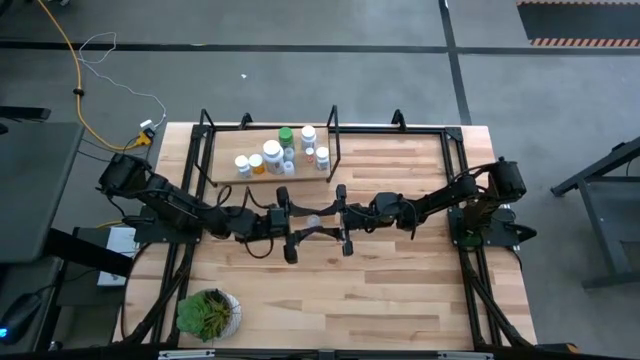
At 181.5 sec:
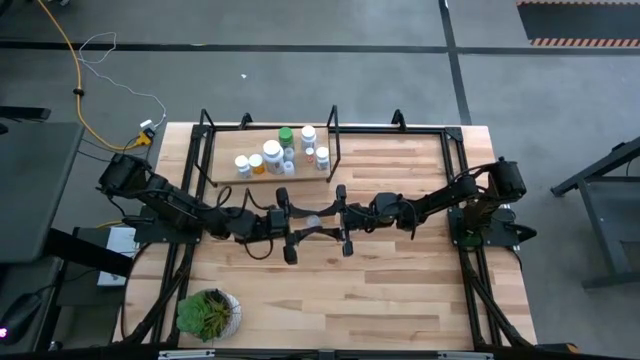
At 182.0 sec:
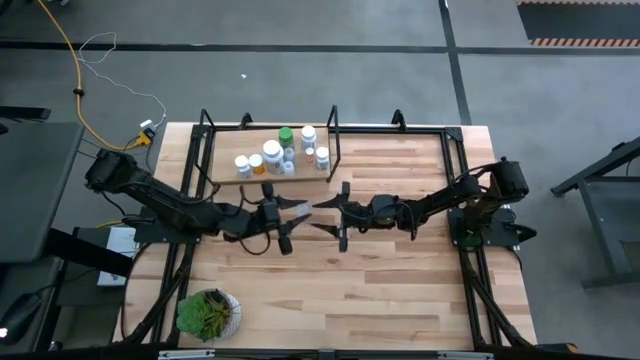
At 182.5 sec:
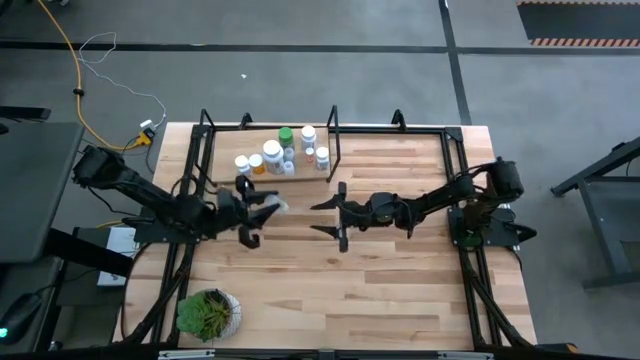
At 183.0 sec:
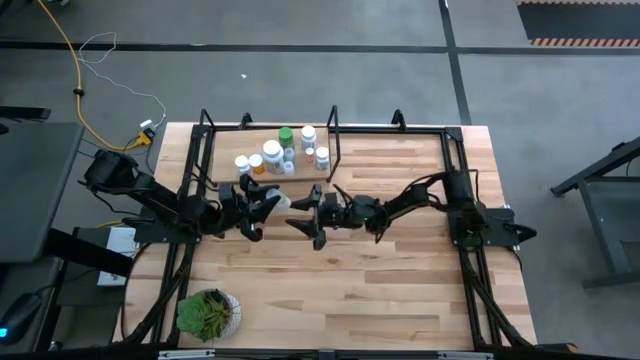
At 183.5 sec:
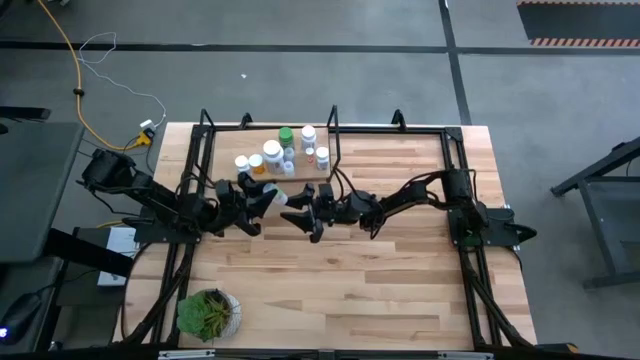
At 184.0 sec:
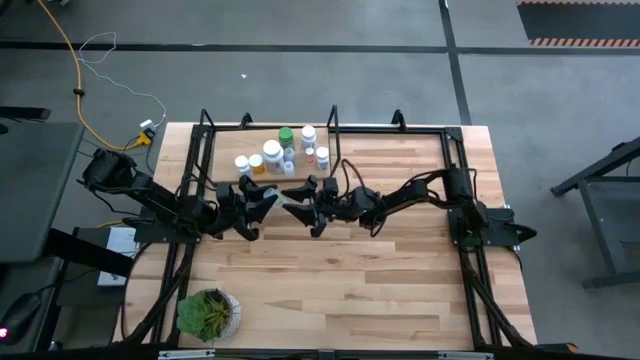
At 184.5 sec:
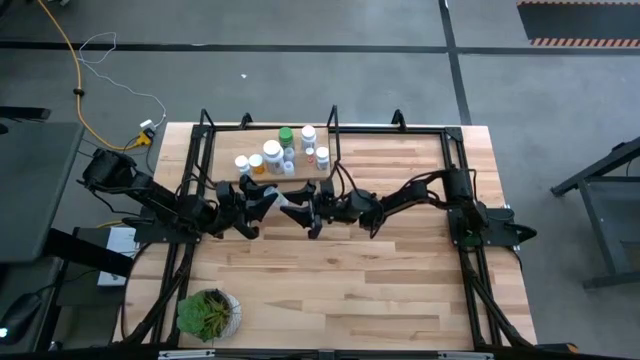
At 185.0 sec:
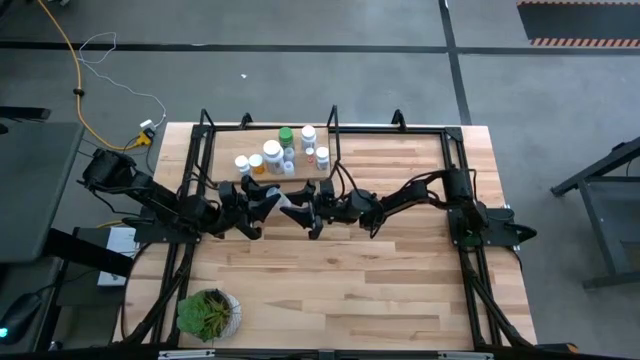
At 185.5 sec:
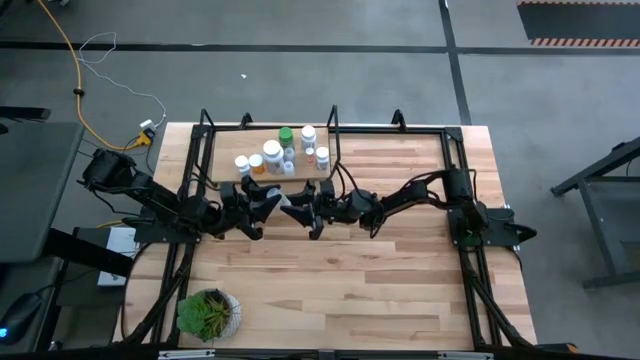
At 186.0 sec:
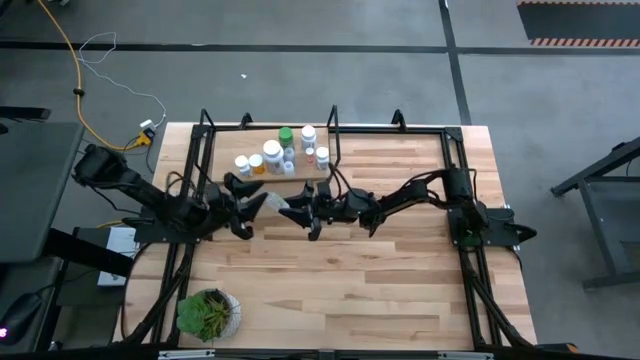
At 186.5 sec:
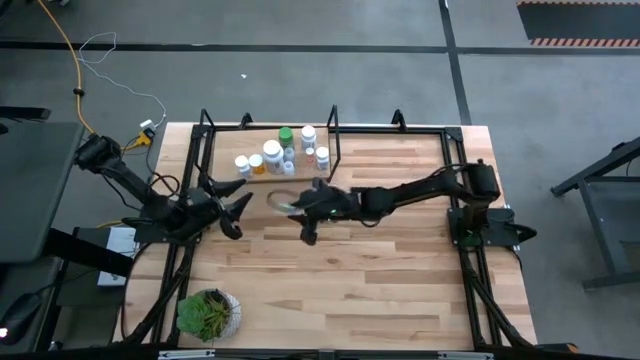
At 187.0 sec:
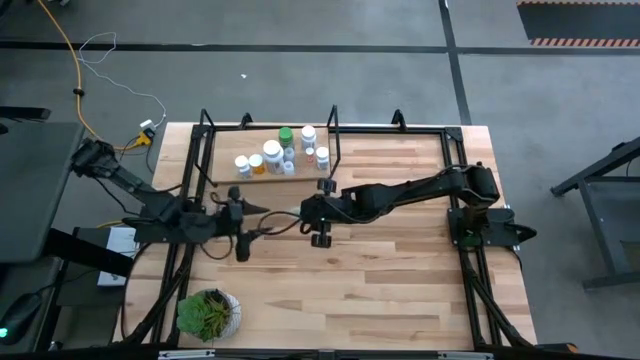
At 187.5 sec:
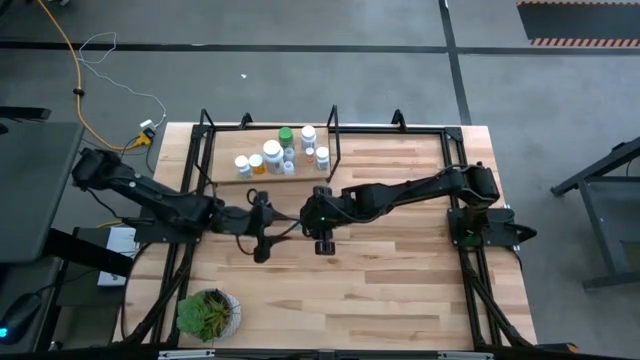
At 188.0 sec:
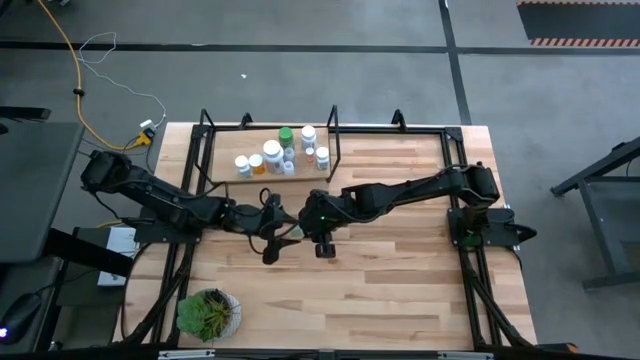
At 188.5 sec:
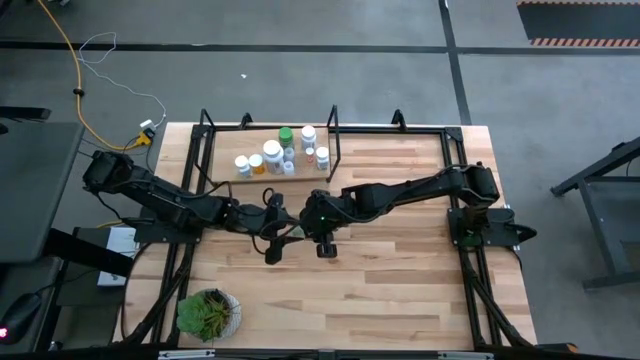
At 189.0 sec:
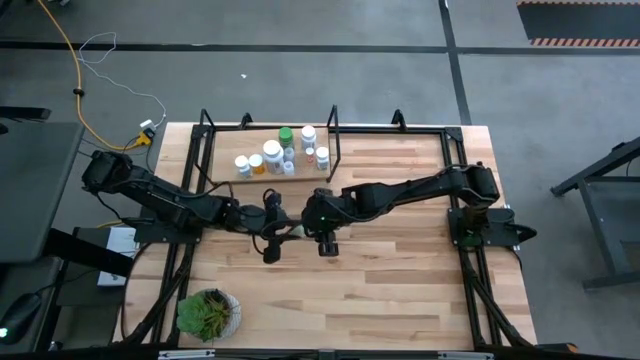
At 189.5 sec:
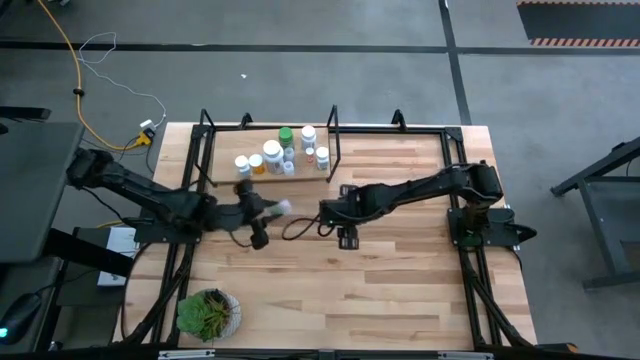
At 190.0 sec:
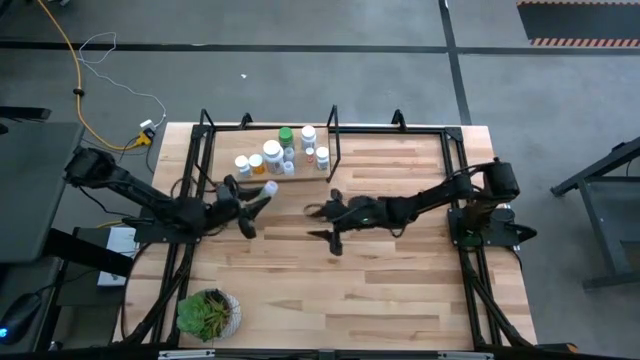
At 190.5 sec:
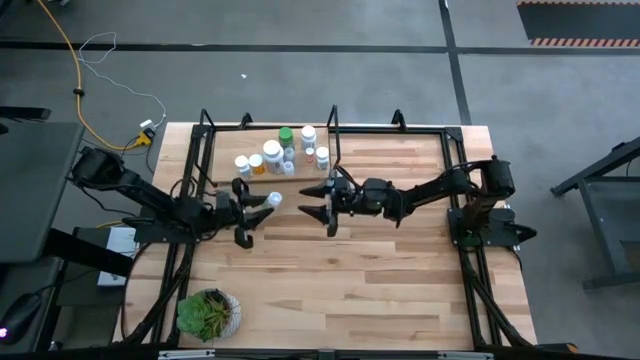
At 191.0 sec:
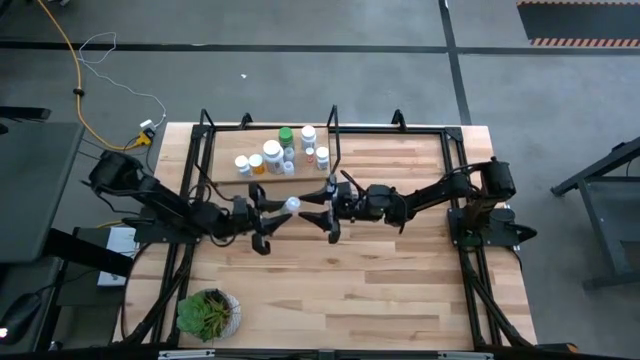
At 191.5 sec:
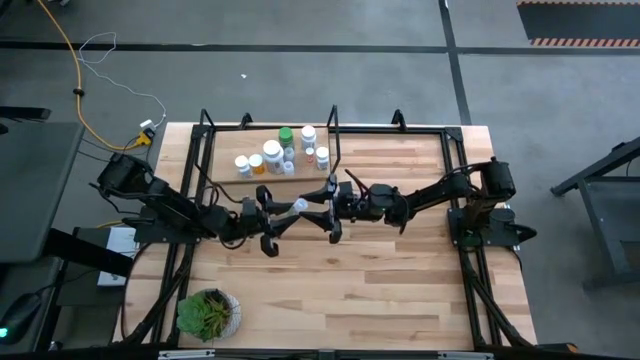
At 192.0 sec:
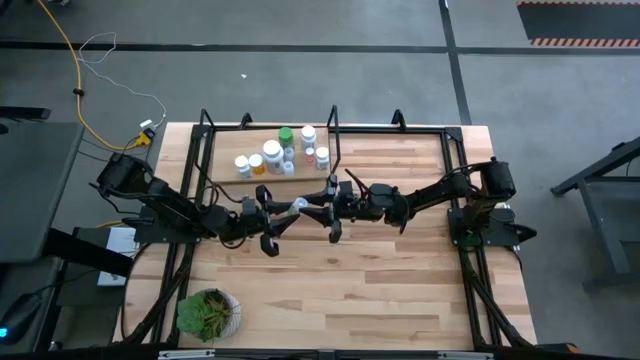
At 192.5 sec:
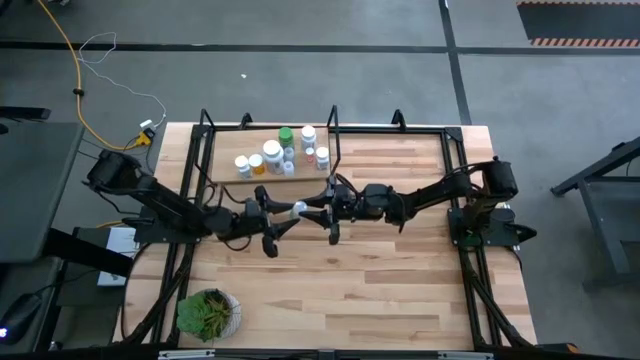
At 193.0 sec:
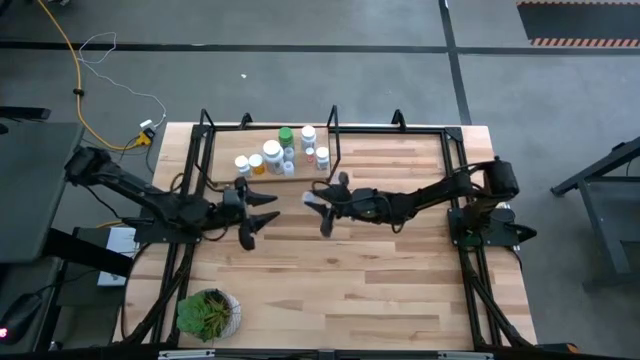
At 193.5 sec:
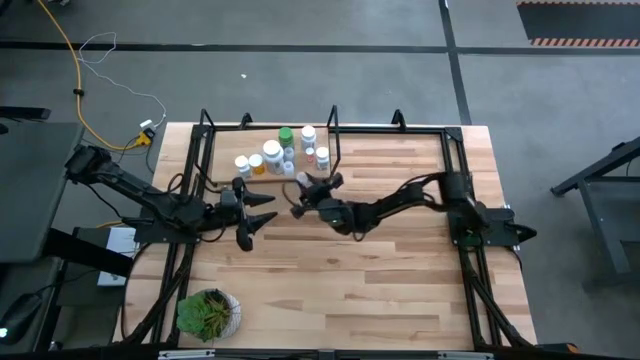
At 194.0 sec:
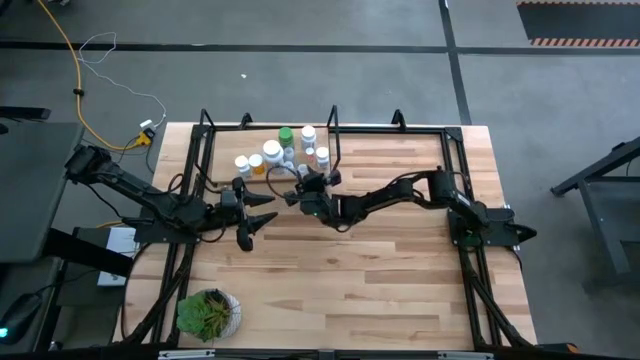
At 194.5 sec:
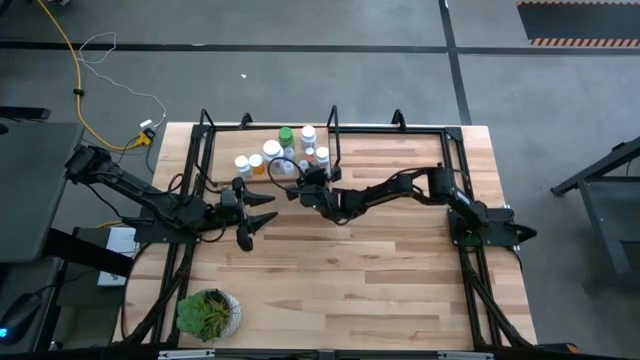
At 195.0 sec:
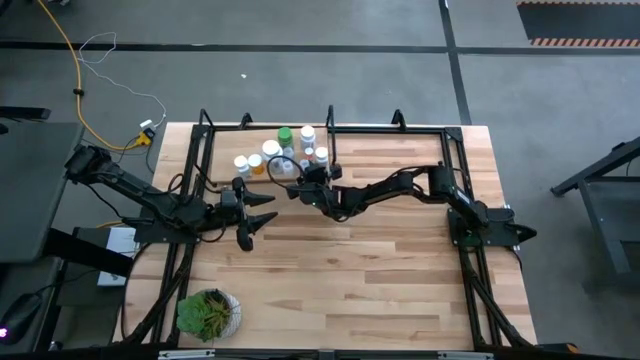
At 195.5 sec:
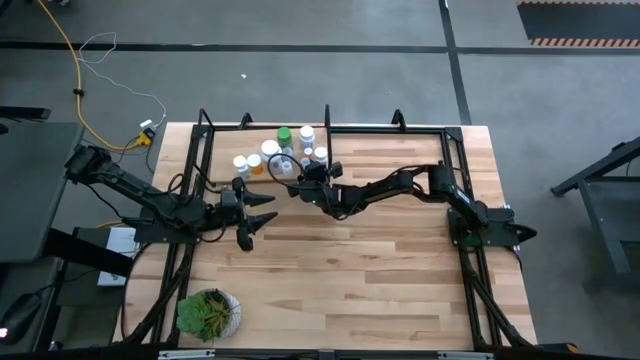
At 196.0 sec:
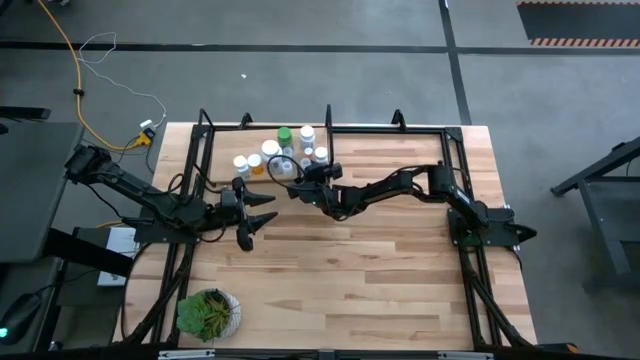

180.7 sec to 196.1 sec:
Task: Pick and place medicine bottles onto shelf by color
Adjust the small green pill bottle on the shelf

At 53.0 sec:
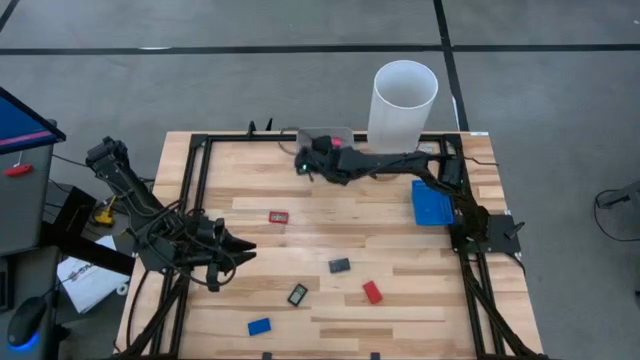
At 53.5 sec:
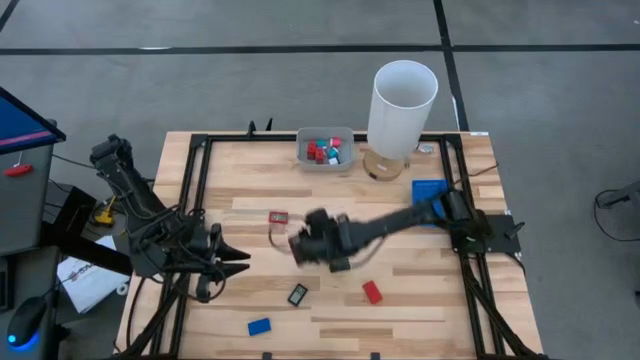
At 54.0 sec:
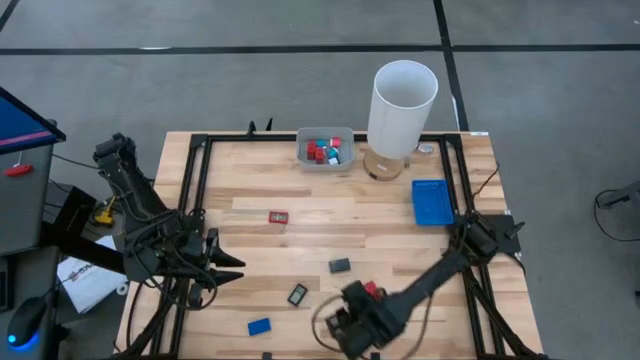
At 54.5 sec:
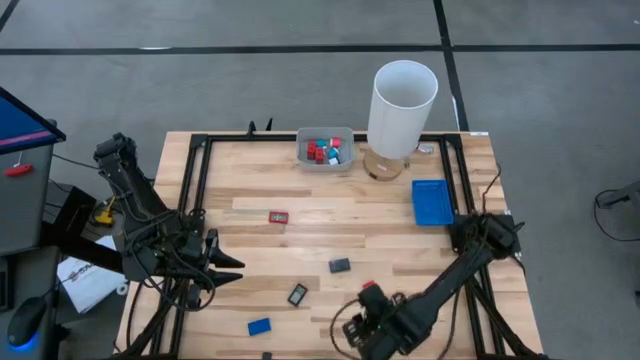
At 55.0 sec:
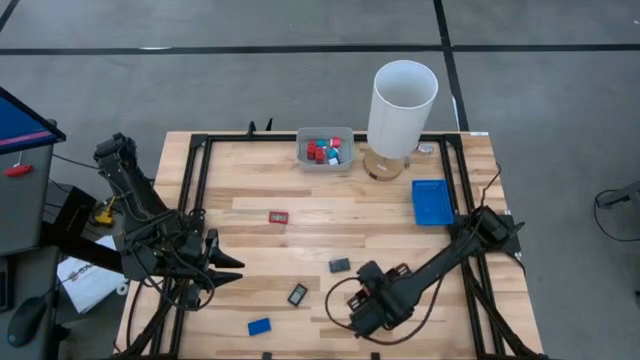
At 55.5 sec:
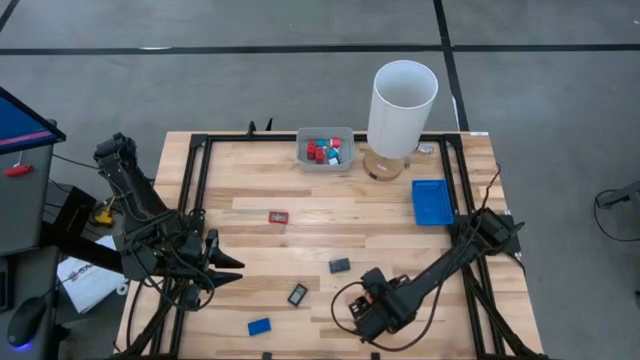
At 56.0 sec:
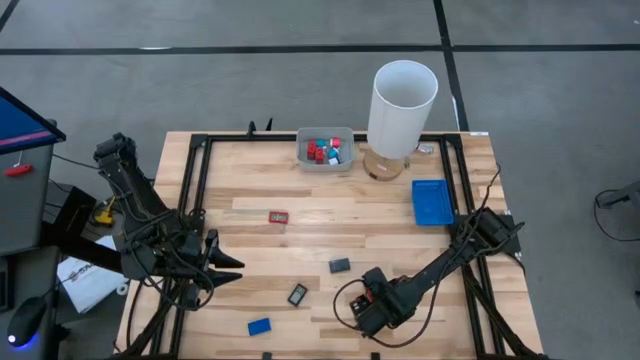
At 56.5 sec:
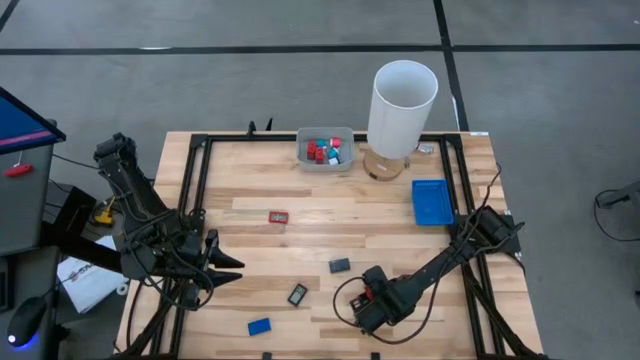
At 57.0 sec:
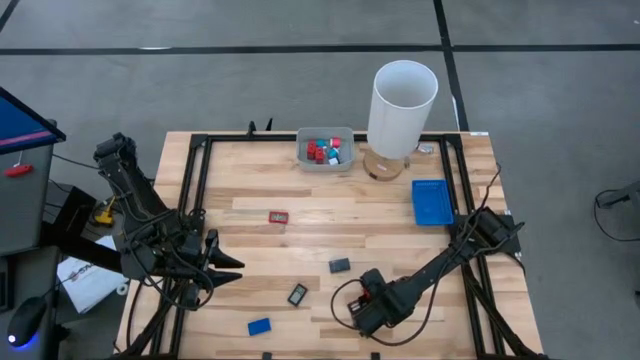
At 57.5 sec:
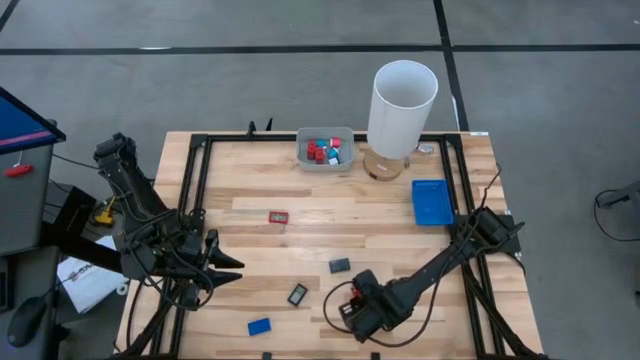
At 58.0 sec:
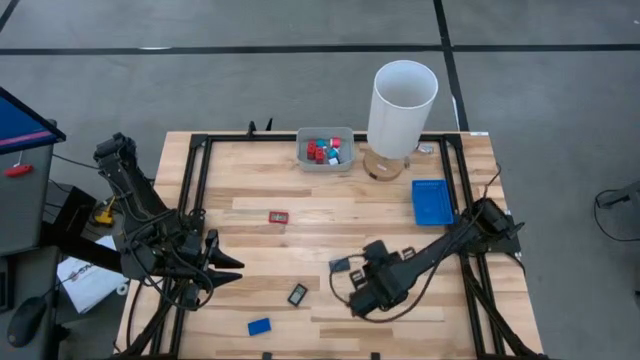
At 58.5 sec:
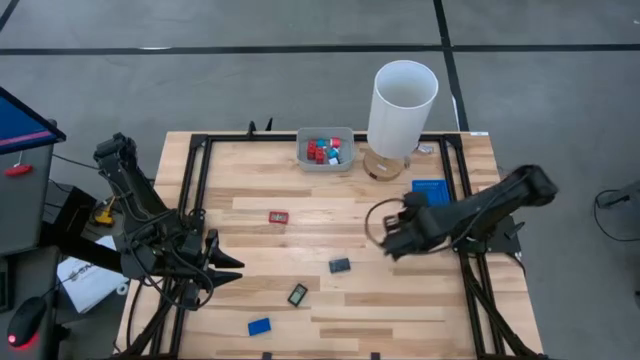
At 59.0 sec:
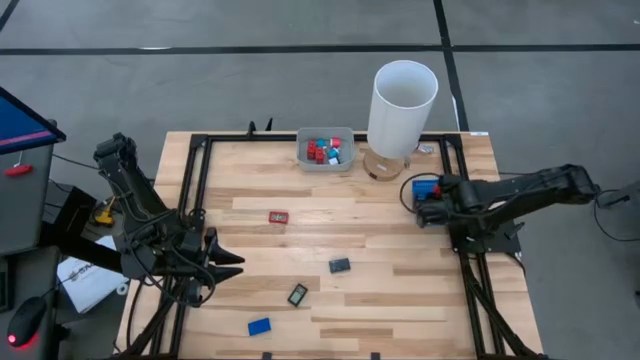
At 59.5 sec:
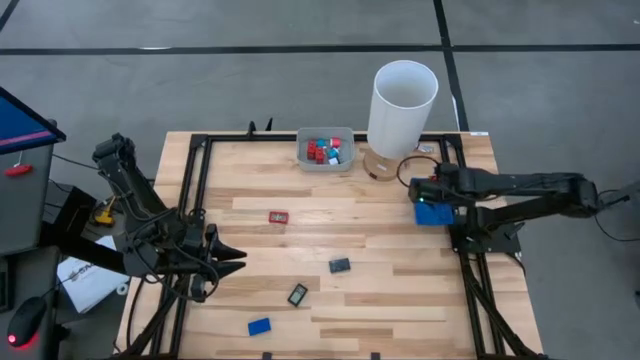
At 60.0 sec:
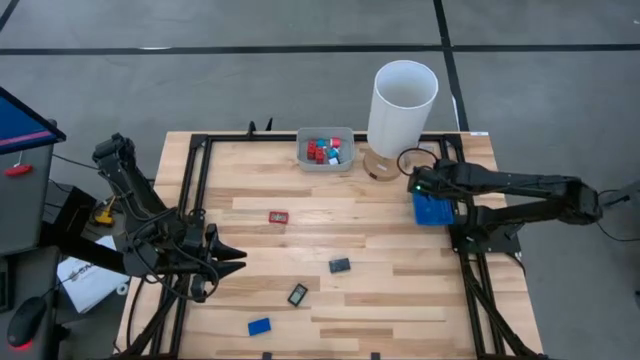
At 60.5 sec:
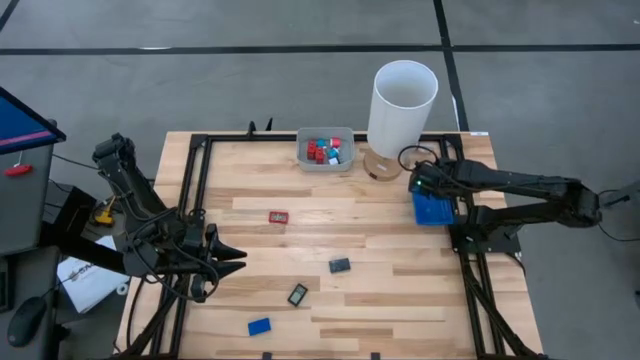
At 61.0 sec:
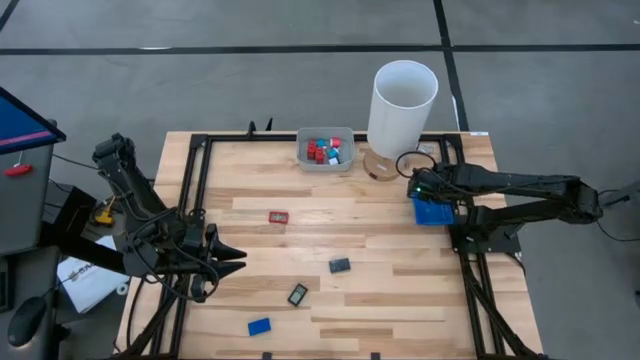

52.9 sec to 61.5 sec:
Task: Pick & Place Office items
Put the bottom red digital clock into the blue basket
